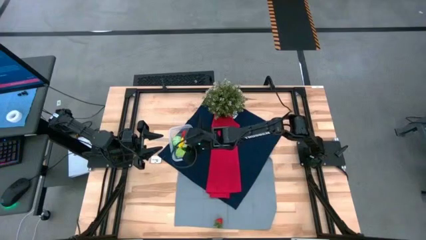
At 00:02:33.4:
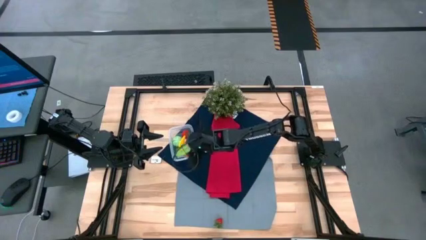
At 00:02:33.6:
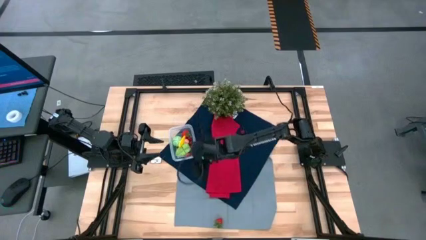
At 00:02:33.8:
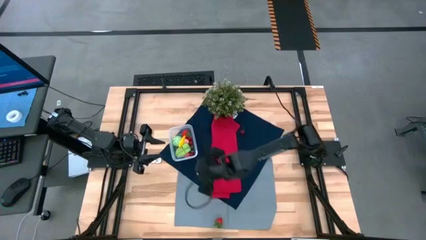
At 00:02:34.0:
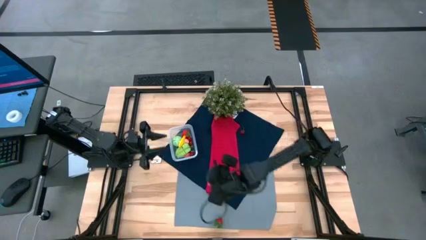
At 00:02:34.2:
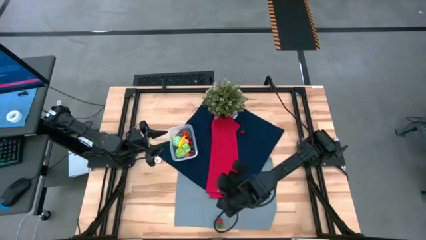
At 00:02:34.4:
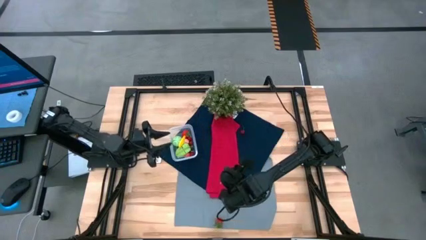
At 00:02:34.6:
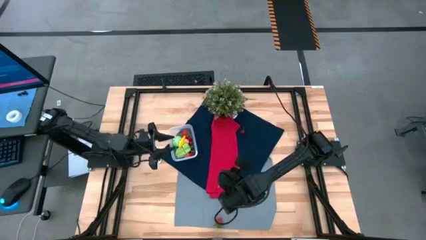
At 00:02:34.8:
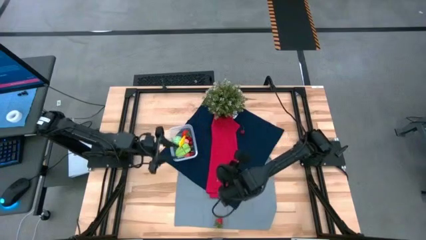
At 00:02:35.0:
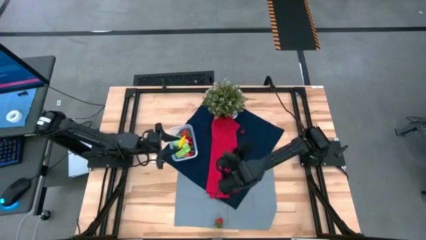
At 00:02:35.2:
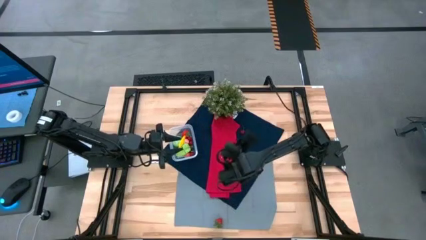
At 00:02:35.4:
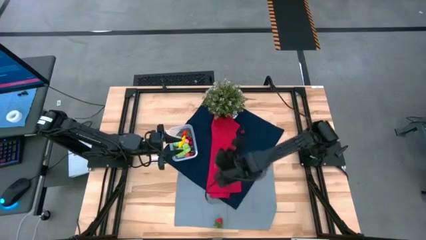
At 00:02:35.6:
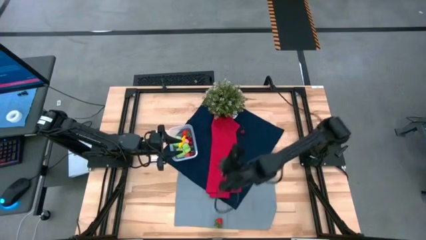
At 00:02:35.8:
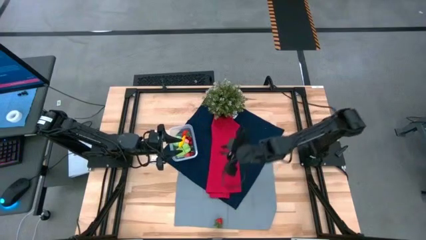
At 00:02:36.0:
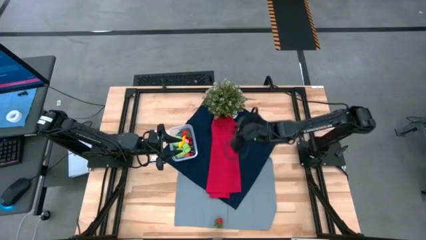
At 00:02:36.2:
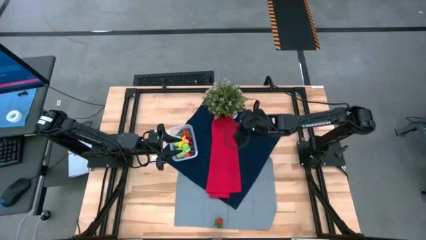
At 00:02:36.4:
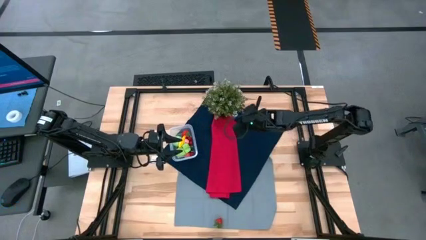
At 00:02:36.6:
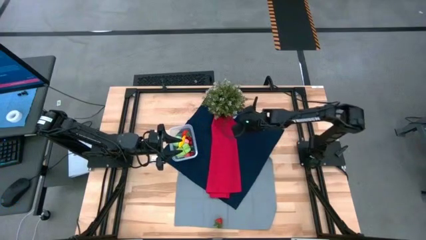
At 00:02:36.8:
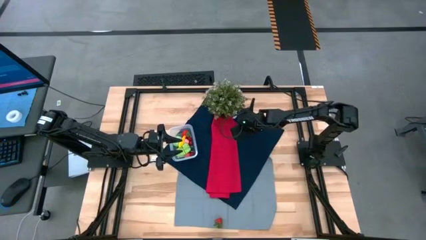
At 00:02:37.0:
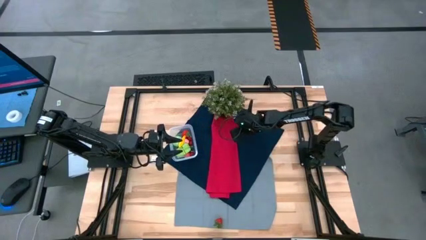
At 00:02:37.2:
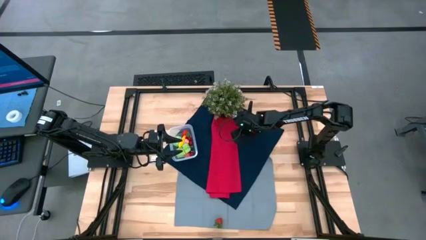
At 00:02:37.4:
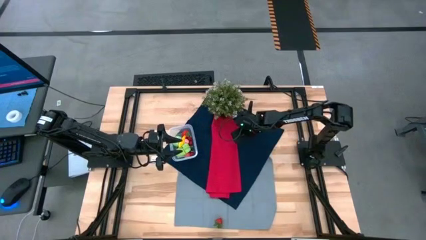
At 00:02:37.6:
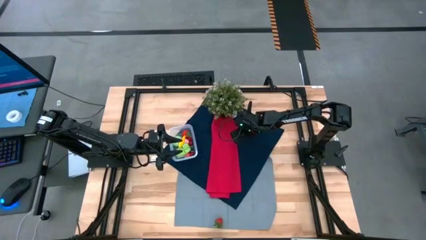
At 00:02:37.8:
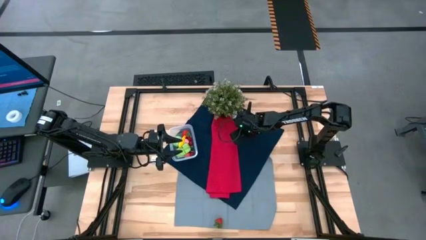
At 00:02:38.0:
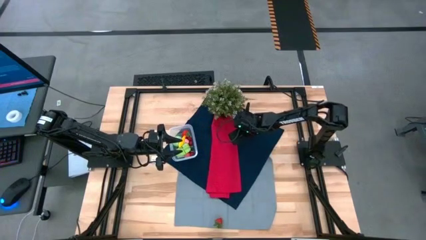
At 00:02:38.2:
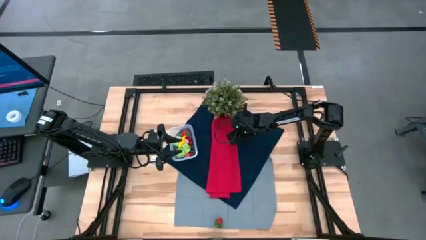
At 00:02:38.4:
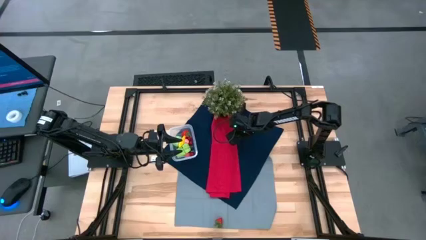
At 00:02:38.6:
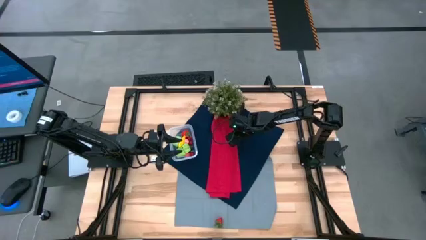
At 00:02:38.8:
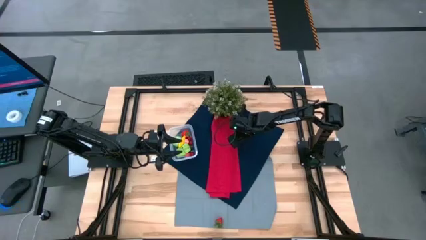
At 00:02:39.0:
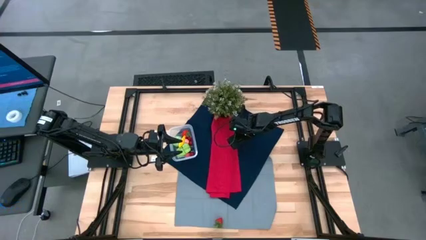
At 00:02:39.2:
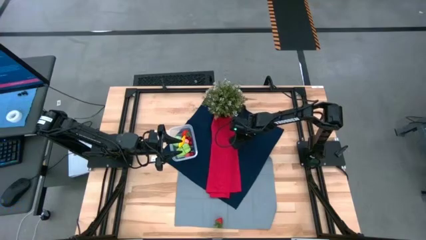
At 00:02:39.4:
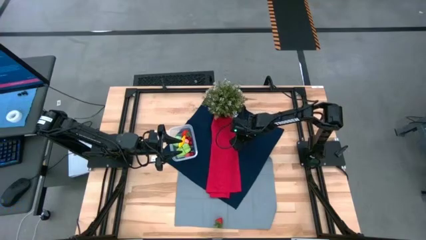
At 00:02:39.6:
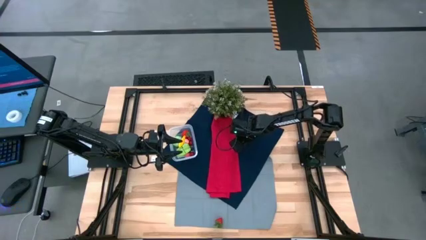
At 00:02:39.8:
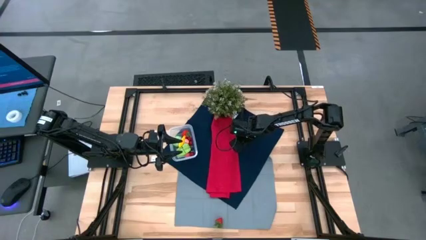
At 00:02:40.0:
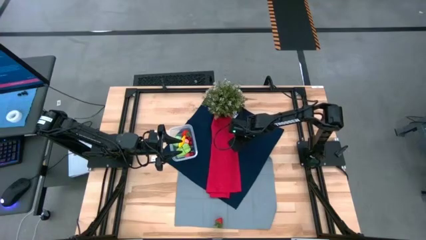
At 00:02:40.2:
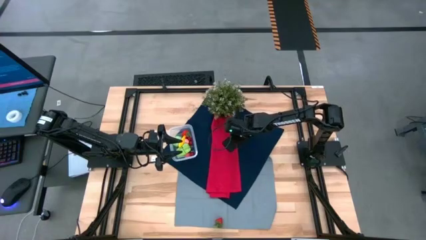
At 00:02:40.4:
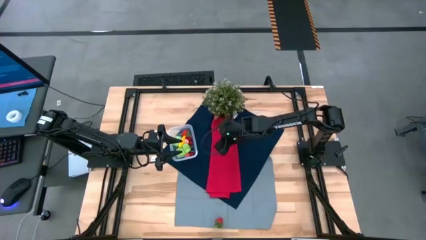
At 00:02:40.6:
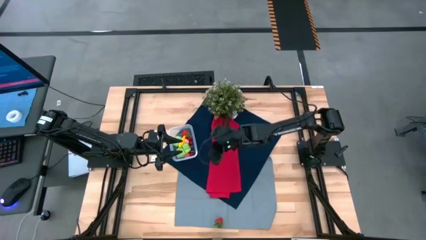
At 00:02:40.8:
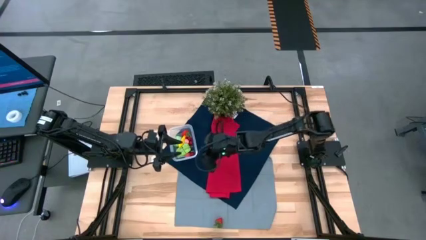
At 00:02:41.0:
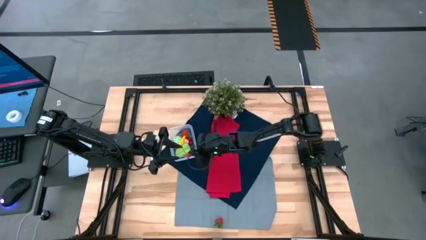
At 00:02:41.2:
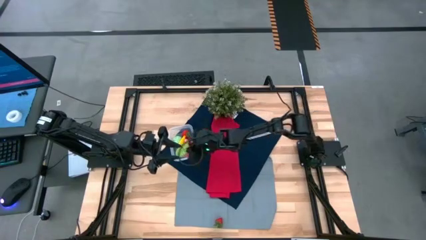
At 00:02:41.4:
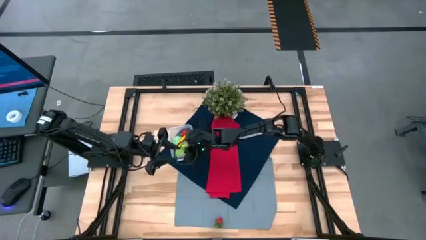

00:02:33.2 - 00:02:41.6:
Task: Pick and placing Produce into tupperware
Put the red cherry into the transparent bin

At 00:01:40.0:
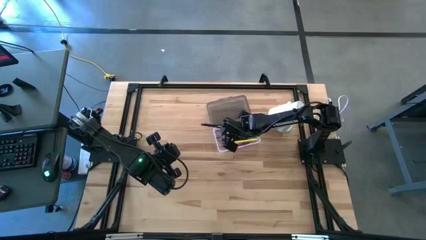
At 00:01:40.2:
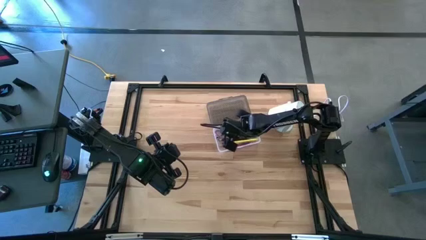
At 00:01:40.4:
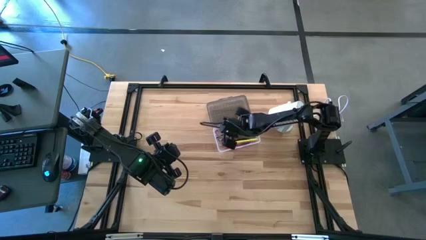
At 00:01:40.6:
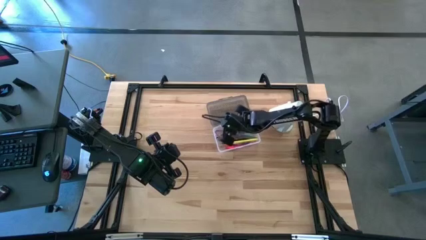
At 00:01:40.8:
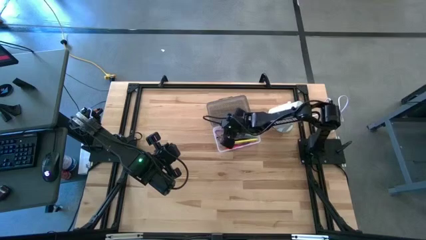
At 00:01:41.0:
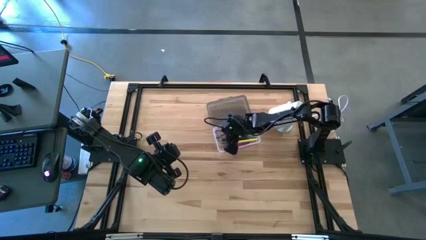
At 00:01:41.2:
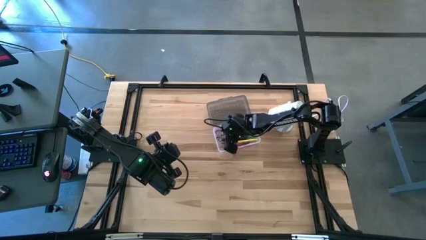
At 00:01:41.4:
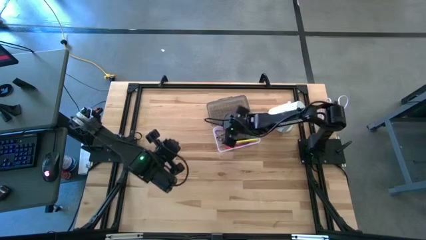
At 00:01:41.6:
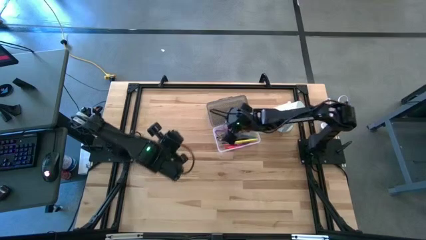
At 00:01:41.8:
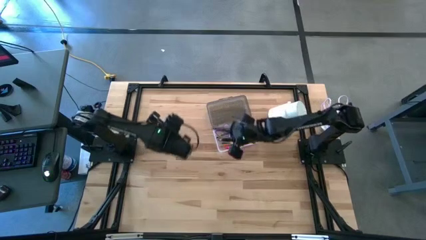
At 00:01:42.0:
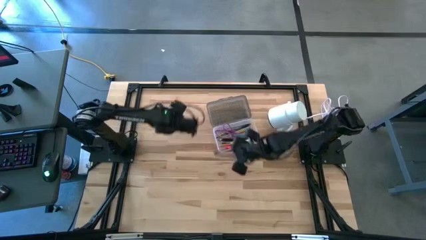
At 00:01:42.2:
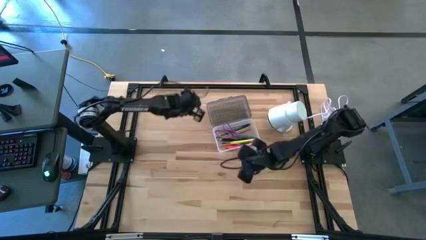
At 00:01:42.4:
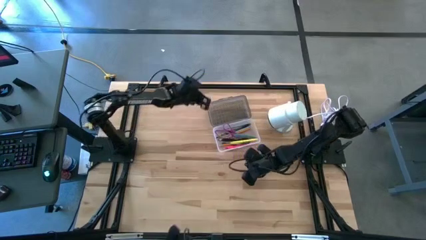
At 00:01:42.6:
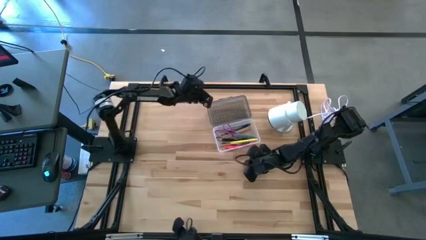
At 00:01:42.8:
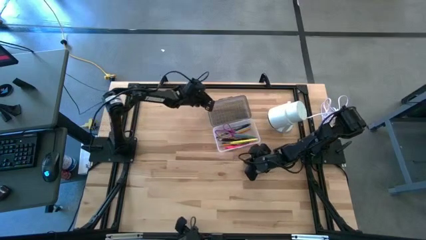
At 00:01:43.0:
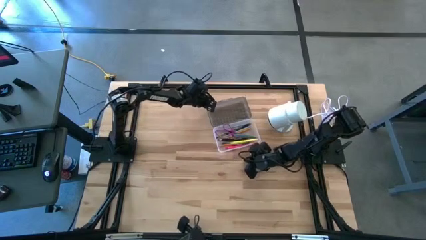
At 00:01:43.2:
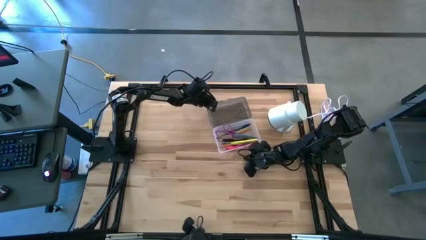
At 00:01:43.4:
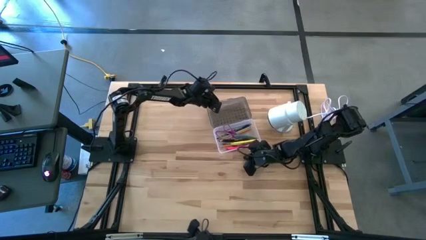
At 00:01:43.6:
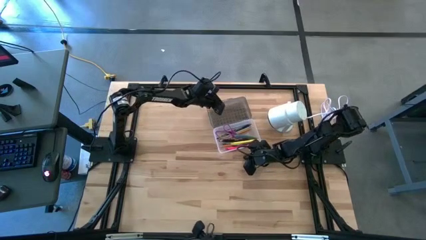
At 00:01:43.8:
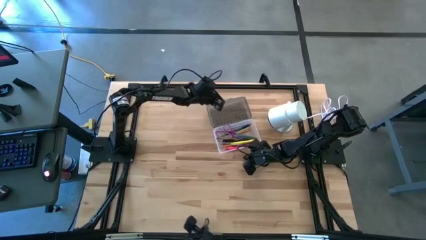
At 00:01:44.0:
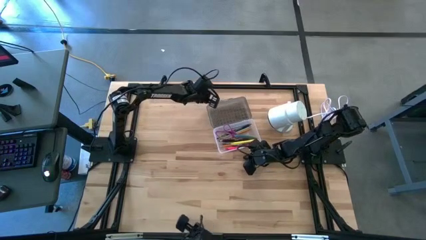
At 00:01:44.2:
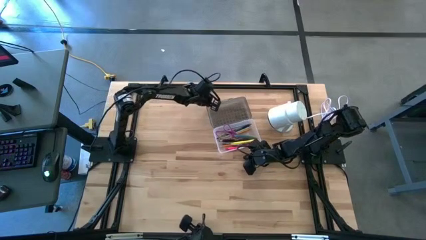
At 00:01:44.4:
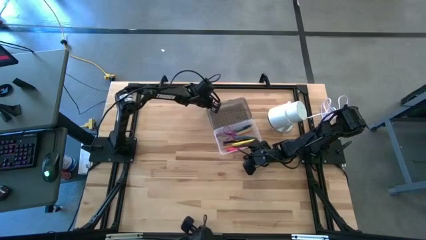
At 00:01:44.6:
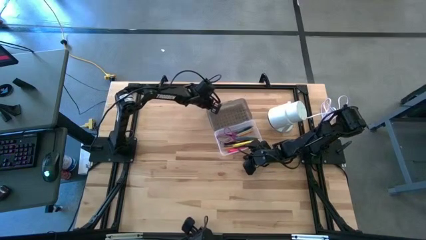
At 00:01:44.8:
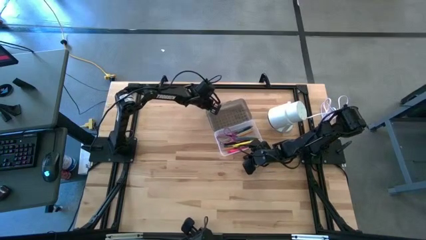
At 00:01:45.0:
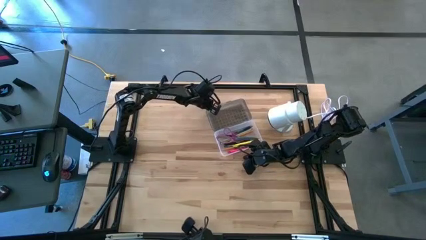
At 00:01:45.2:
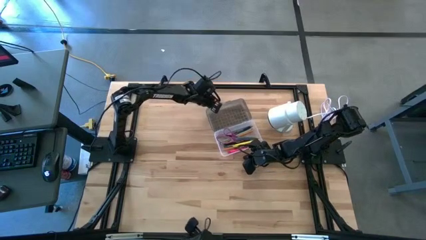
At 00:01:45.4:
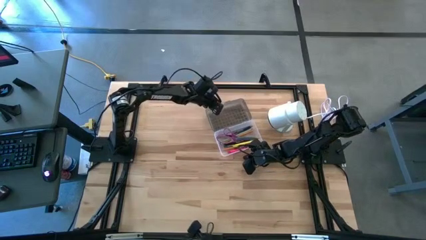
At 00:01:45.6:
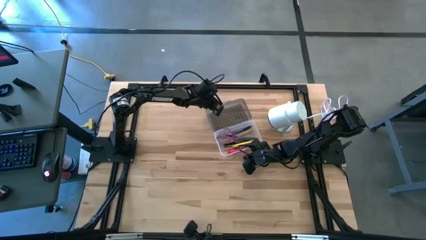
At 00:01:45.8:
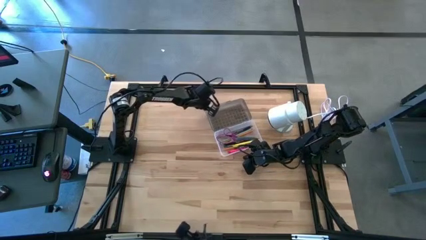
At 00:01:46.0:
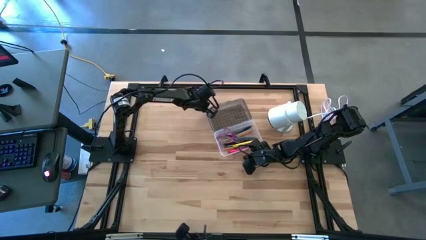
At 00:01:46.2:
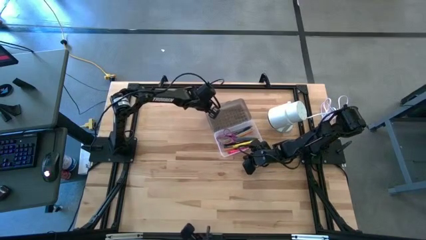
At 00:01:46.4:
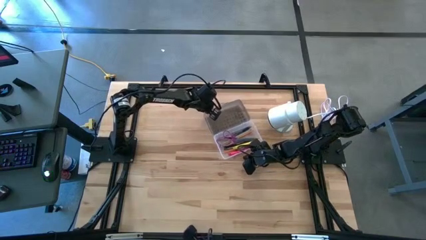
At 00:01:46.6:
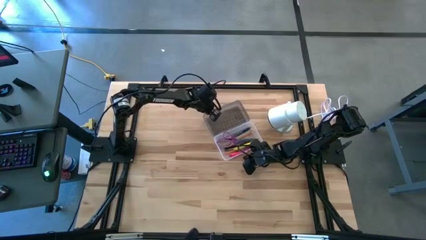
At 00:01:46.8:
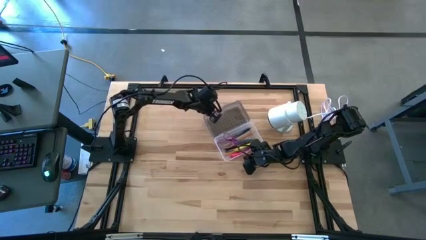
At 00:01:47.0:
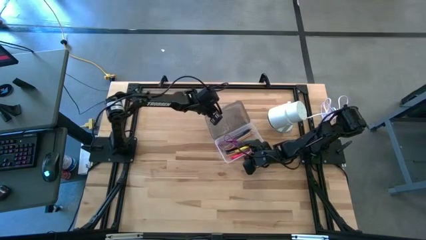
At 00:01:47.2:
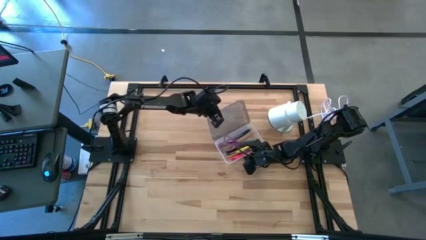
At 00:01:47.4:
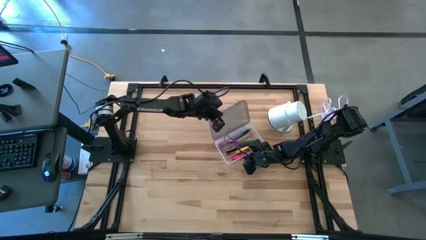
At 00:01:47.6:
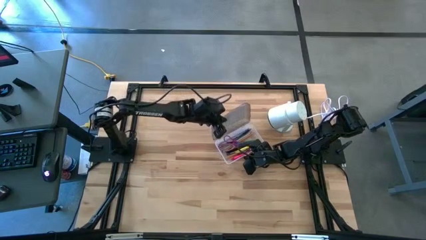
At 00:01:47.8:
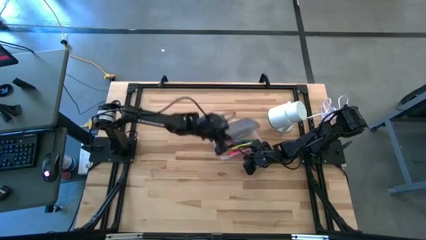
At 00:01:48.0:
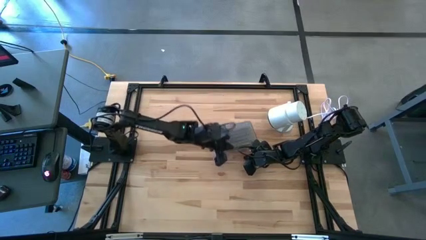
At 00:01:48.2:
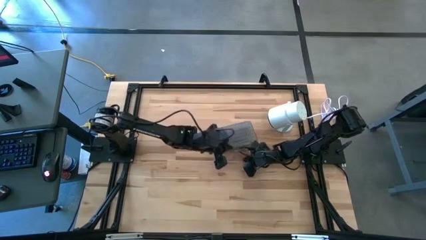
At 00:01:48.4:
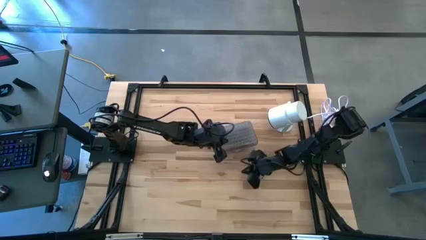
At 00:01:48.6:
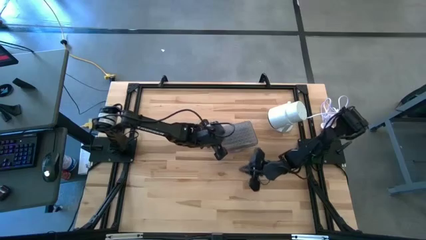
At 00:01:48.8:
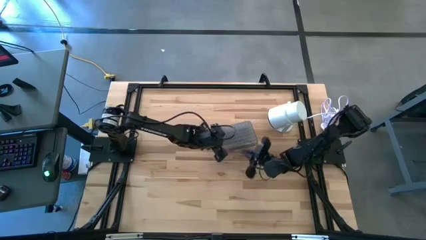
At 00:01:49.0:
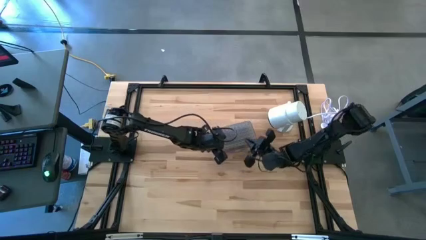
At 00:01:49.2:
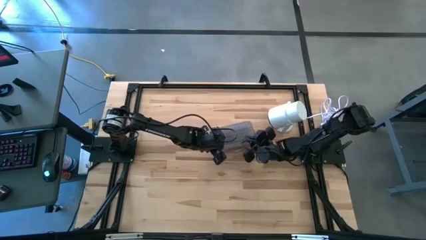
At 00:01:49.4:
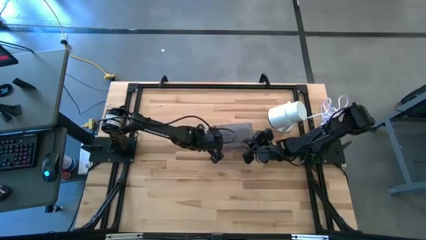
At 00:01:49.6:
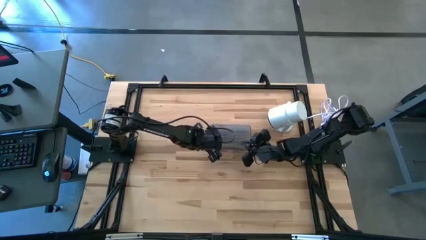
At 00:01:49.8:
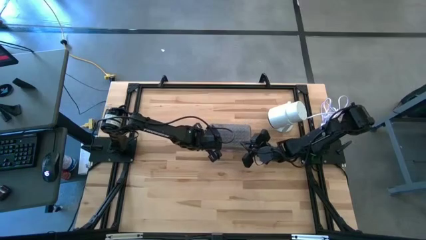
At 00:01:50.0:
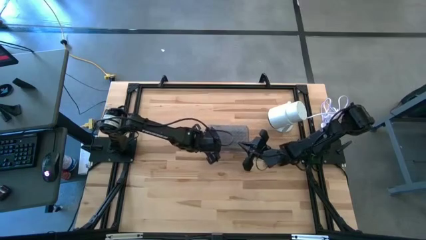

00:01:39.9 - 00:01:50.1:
Task: Pick & place school supplies into a supply box
Close the gray supply box
